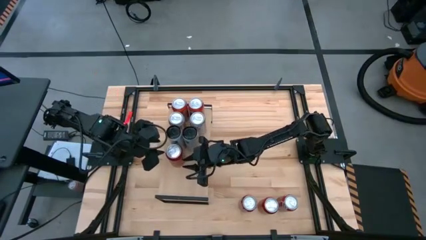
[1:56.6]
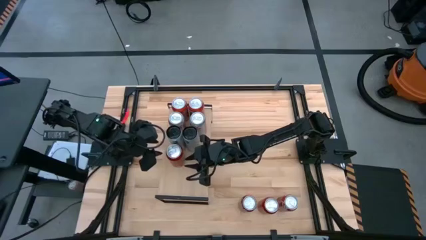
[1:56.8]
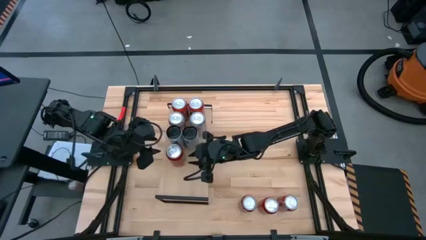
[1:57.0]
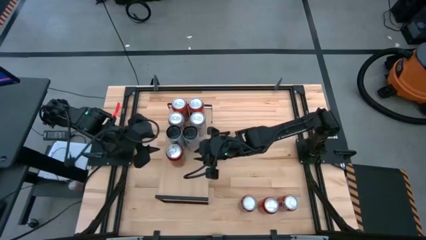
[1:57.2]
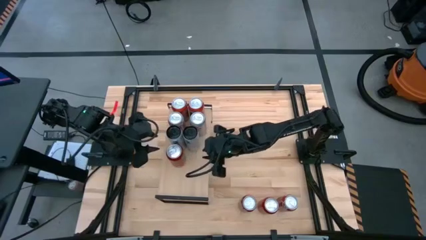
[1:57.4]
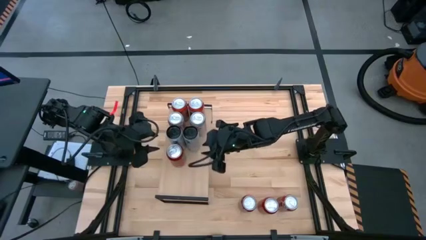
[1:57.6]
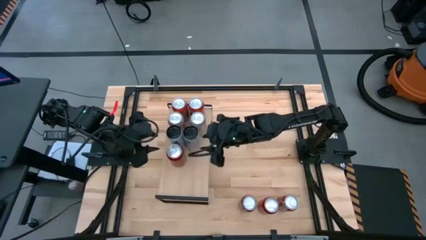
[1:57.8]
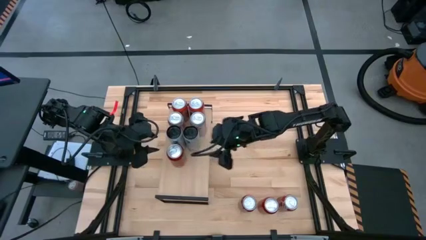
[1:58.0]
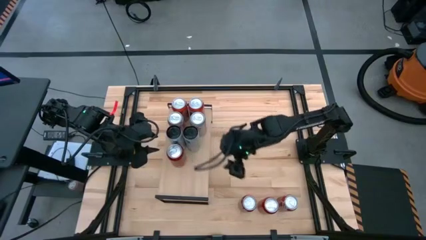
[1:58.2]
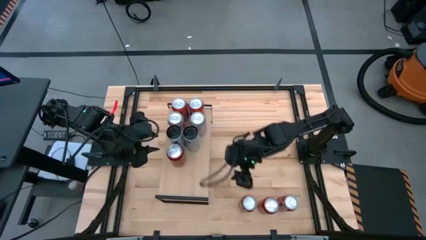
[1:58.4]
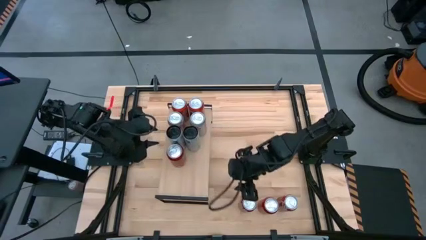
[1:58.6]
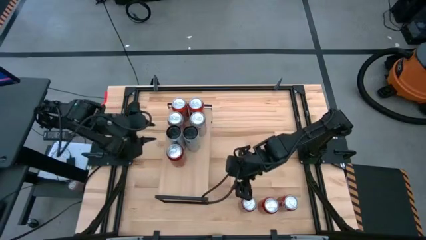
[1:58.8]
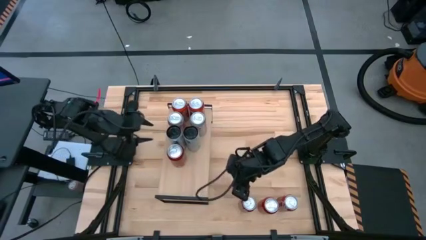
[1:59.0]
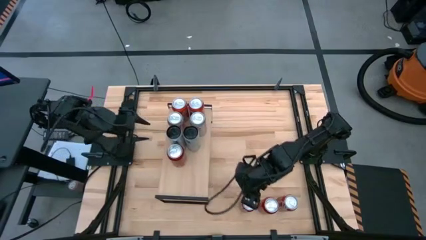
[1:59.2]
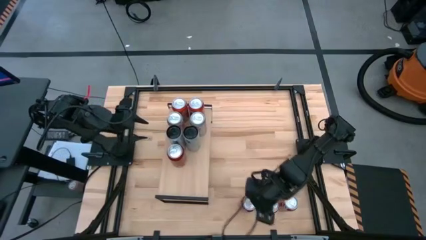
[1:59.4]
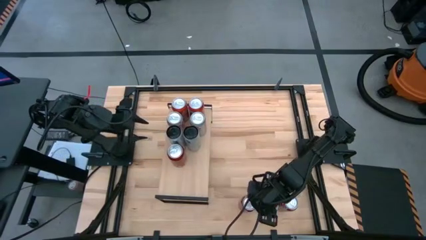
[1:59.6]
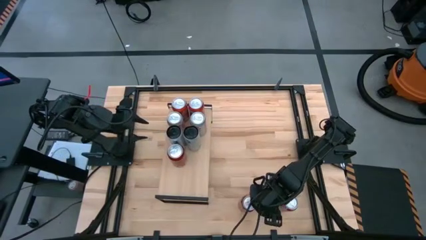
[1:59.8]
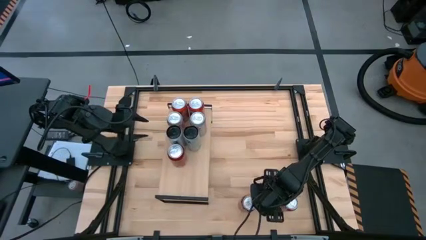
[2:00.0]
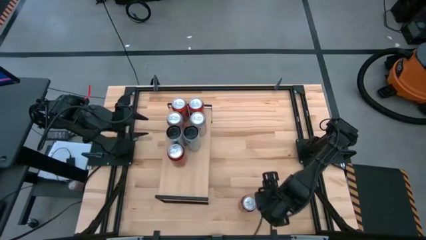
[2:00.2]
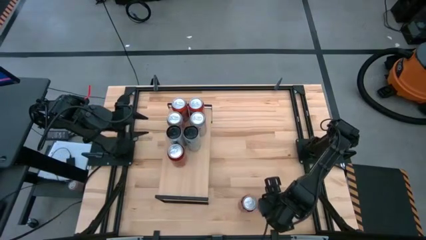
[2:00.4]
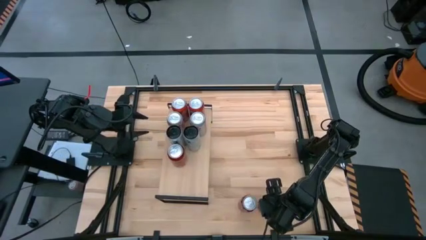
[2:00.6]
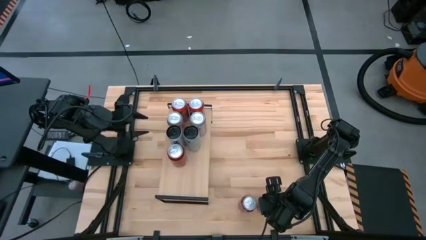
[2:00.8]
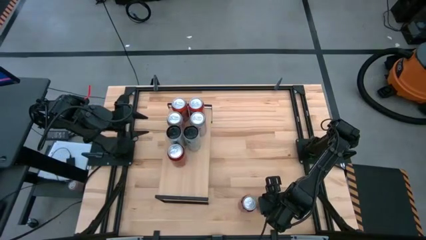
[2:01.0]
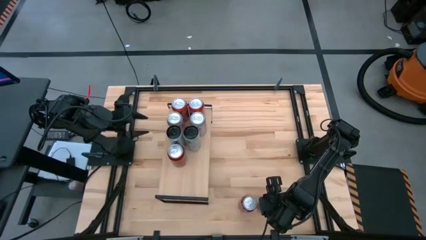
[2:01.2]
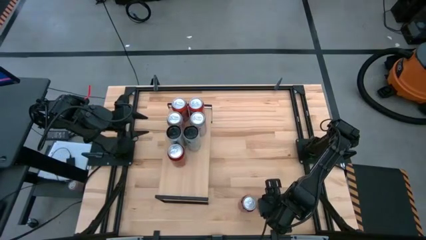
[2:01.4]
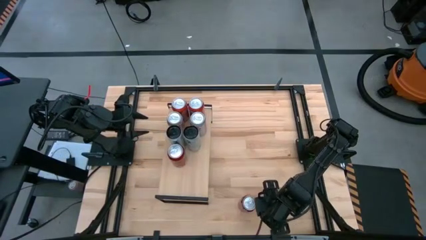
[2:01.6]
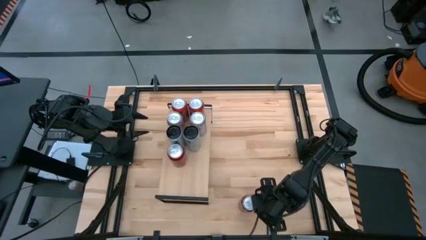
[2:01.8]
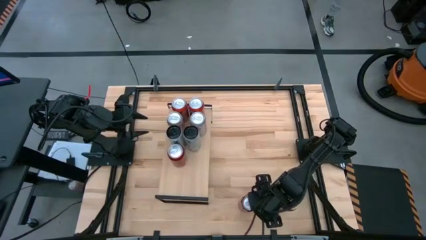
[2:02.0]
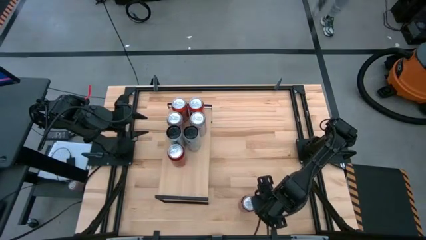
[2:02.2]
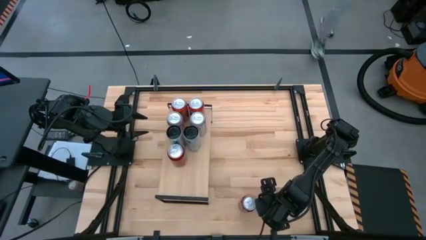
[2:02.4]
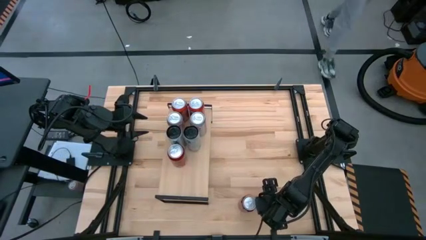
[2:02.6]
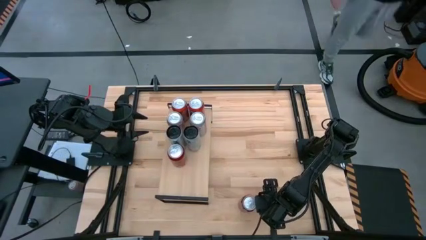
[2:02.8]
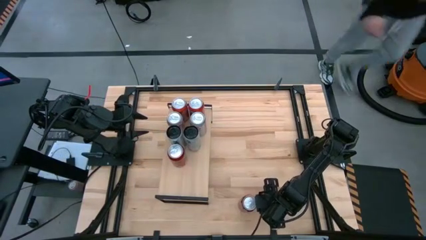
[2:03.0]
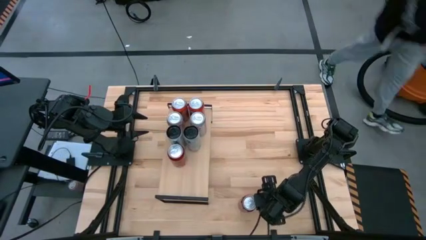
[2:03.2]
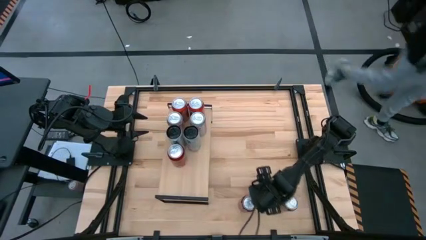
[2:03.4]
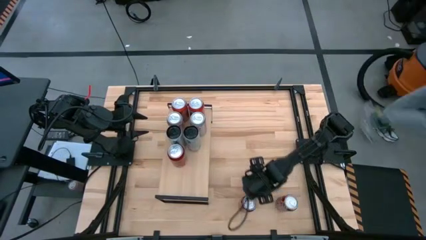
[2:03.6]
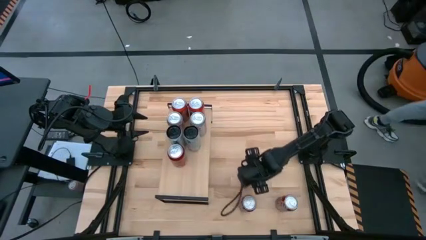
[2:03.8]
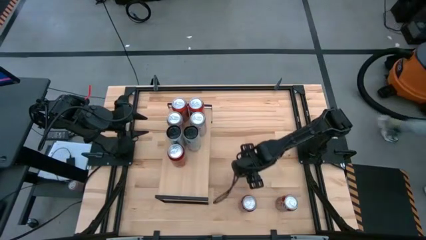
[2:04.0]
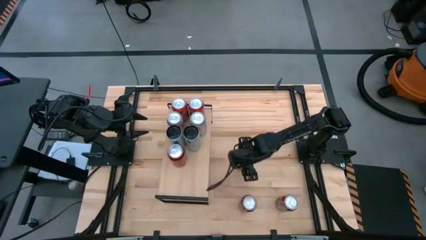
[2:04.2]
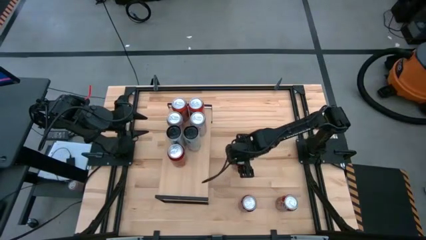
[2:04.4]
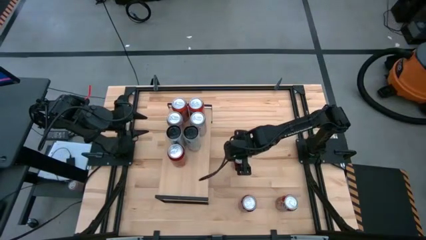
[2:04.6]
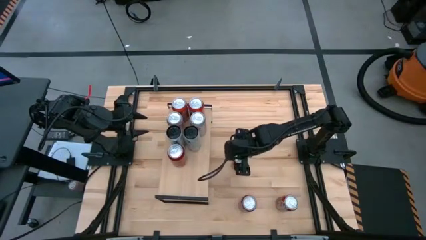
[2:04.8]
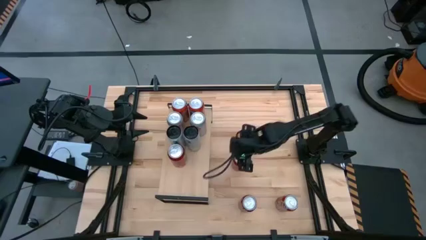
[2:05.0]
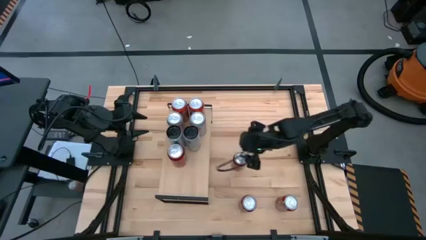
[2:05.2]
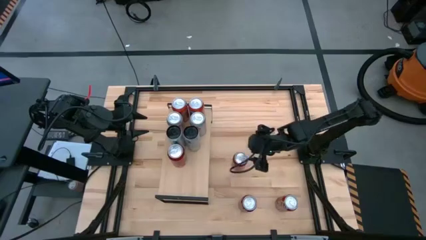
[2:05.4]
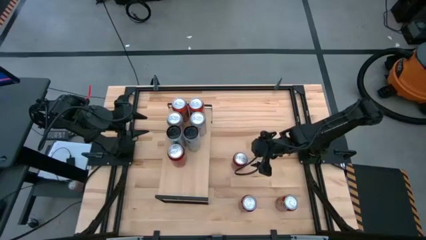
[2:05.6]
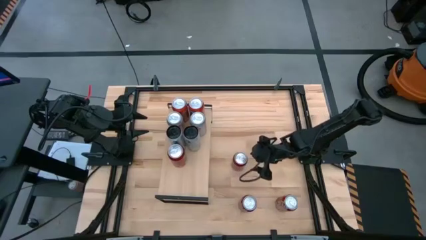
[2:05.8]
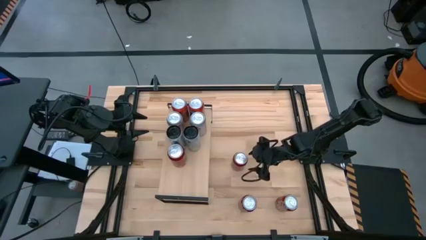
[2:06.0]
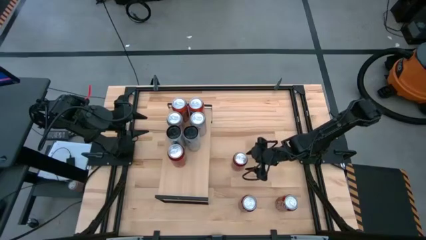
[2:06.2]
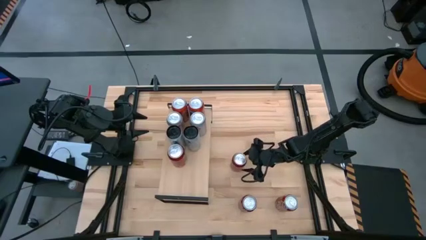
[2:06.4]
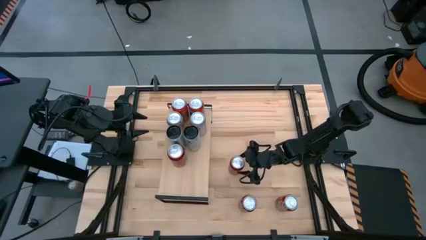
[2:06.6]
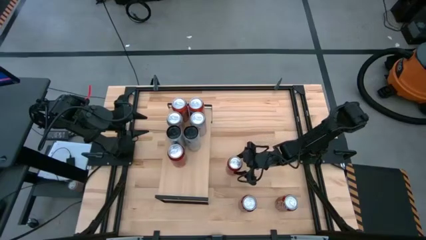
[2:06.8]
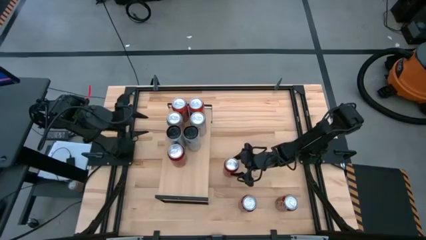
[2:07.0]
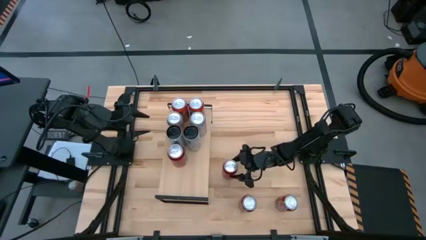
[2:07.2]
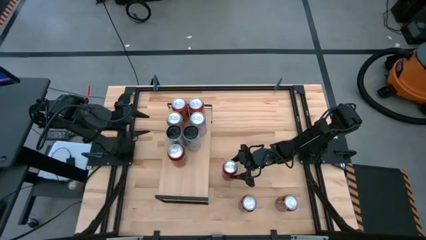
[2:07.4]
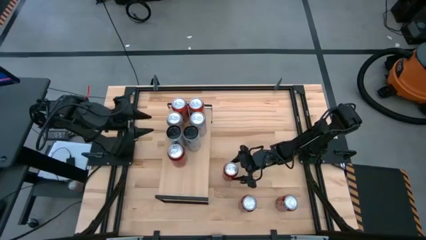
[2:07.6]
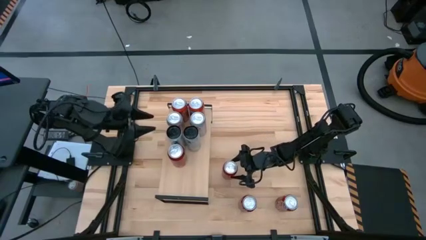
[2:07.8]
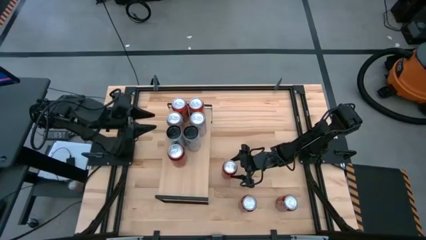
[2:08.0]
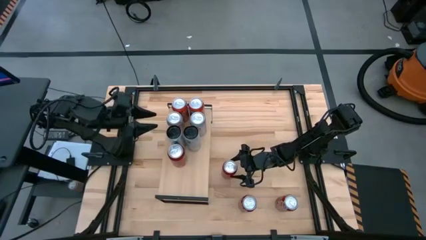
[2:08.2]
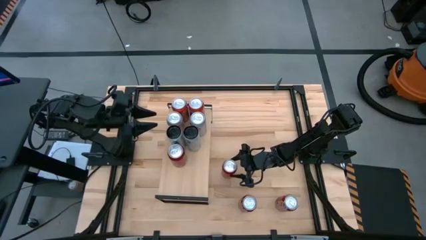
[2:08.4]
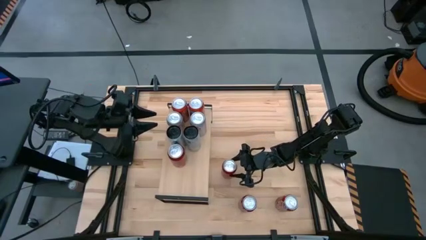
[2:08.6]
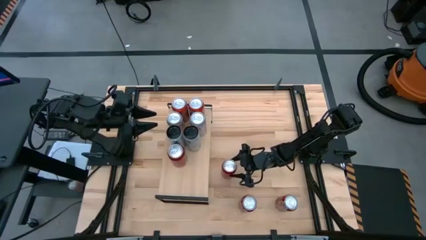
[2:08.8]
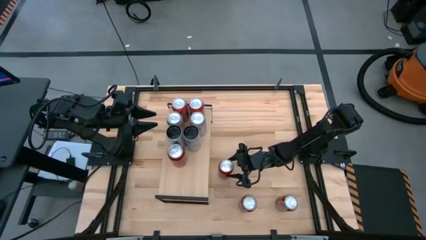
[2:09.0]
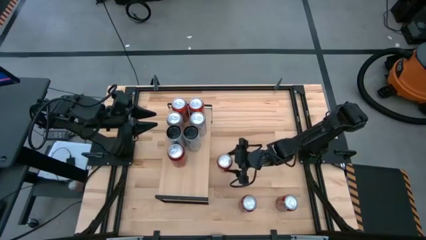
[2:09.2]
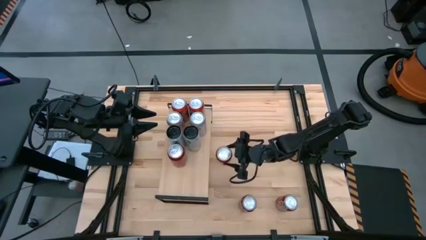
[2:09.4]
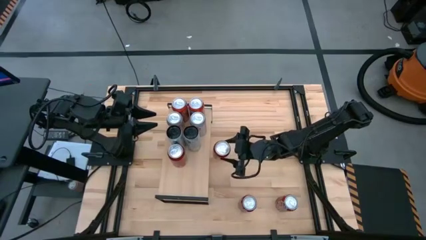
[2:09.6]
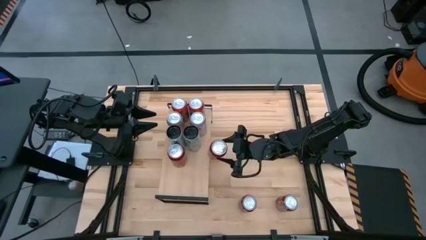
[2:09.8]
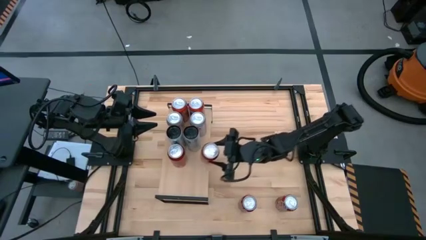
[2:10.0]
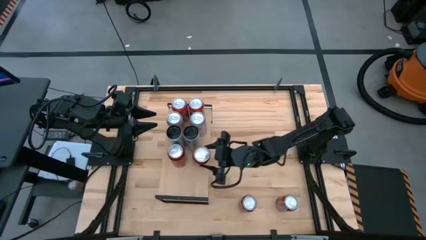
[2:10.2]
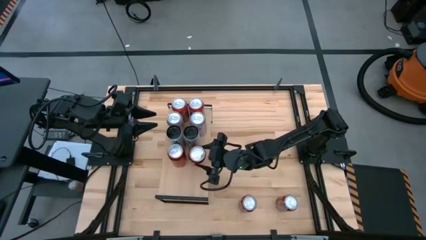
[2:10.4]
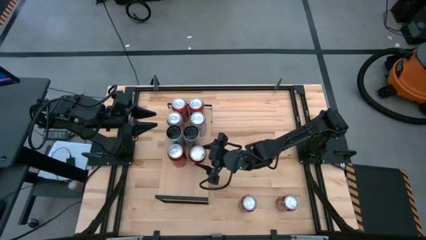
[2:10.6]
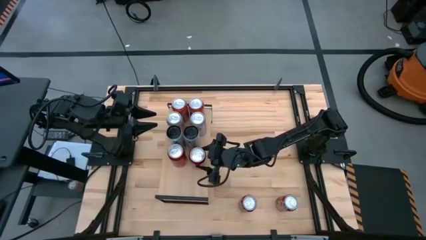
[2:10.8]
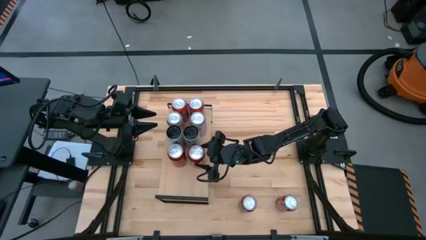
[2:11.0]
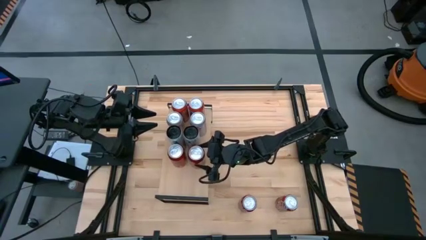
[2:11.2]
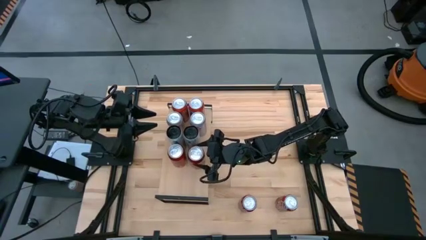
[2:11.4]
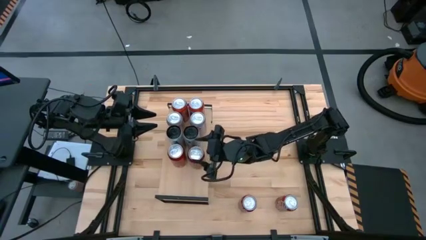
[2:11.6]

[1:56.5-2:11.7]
Task: Pick and place cans onto a shelf
Put the red-black soda can on the shelf aligned with the other red-black pattern soda can
